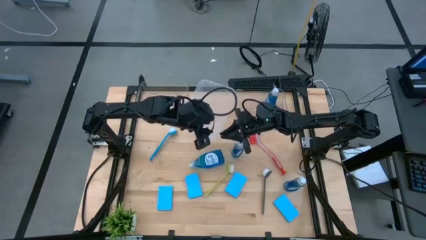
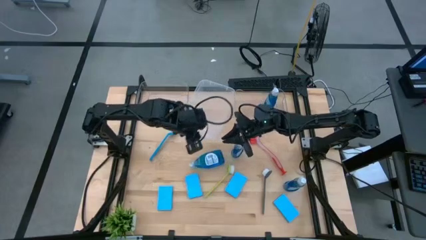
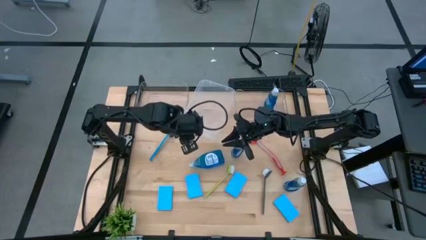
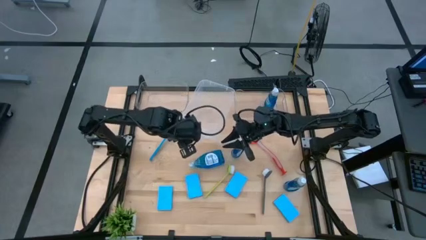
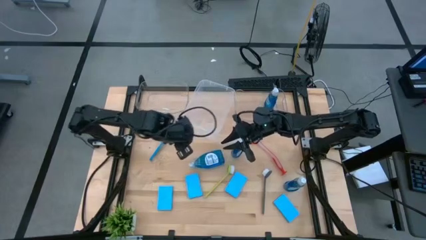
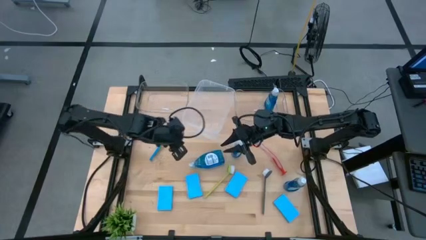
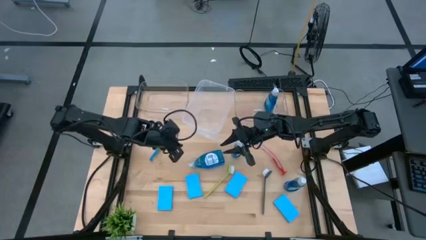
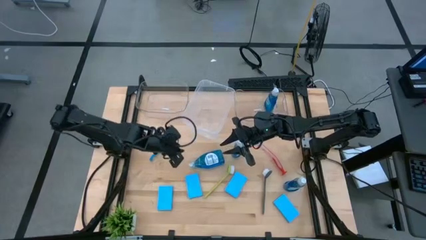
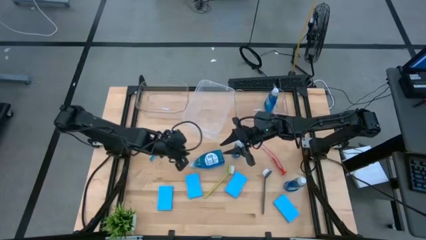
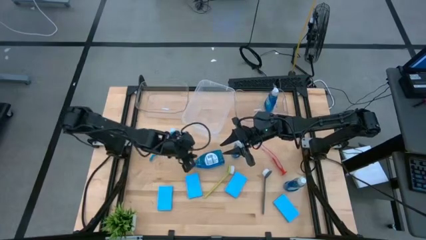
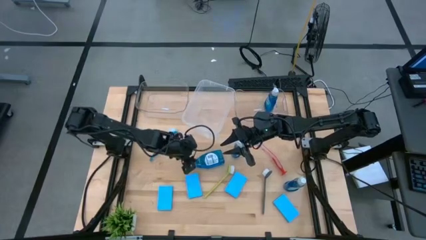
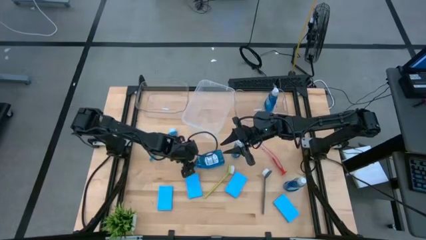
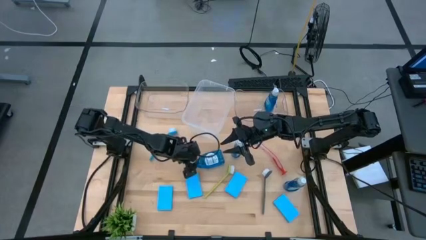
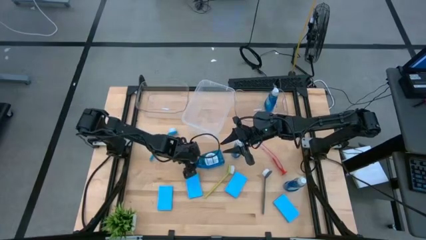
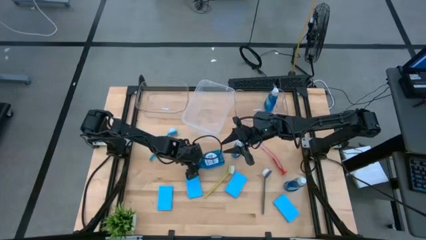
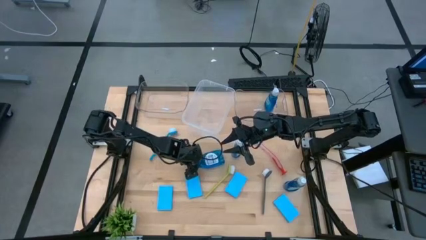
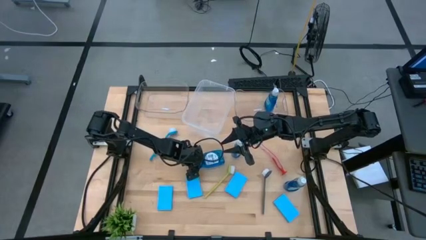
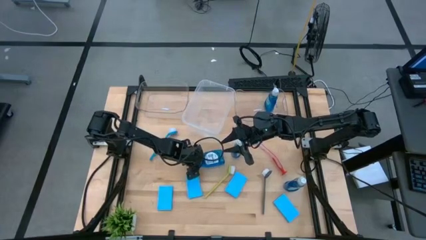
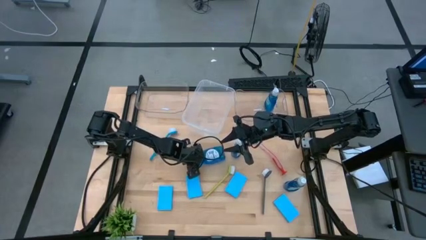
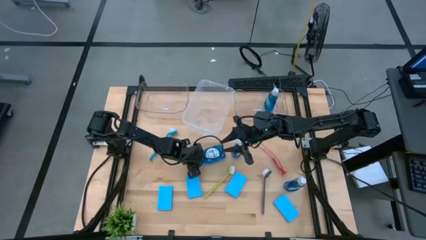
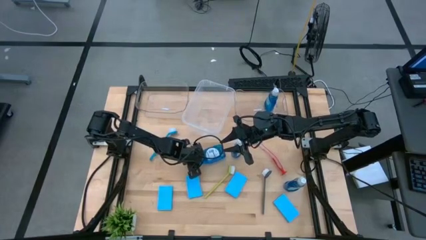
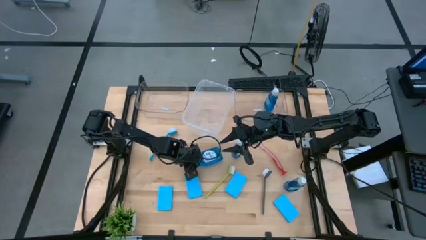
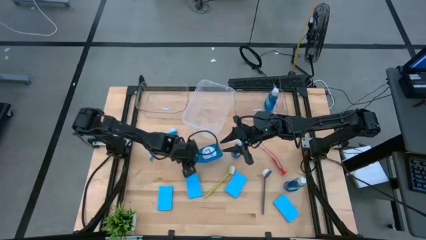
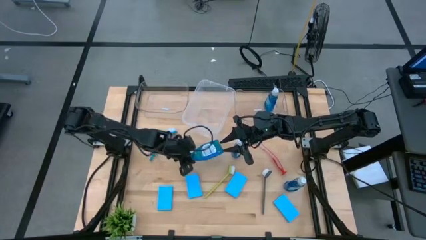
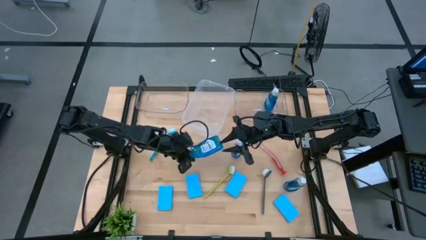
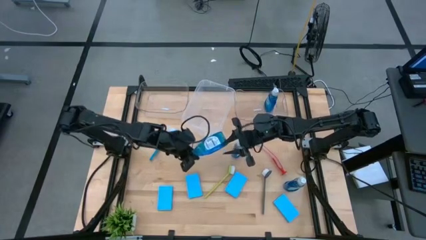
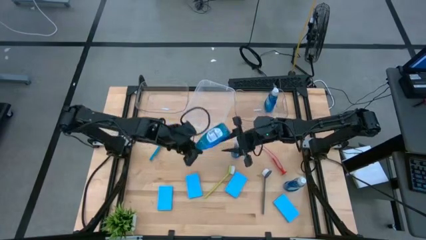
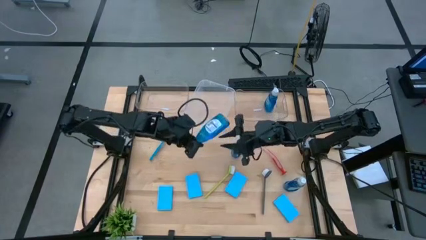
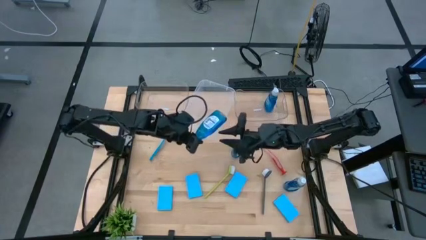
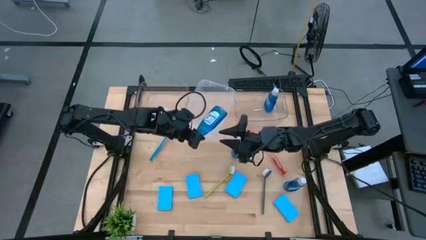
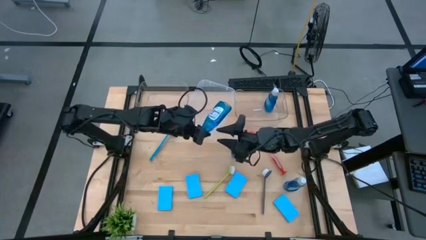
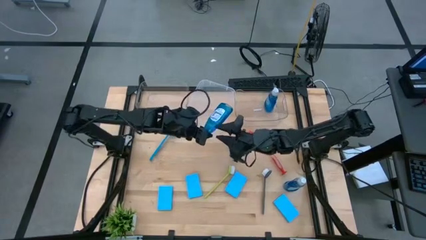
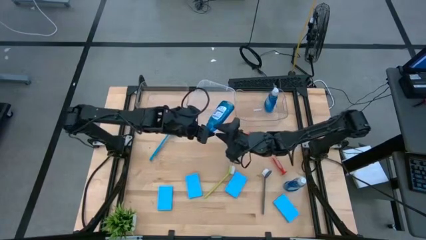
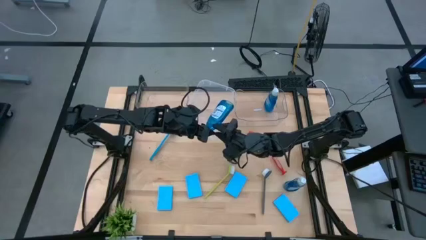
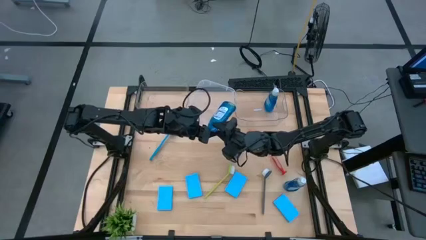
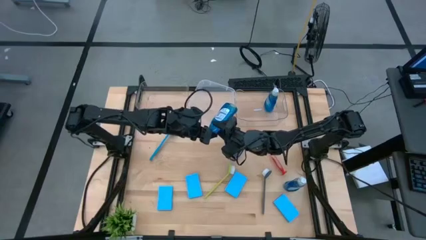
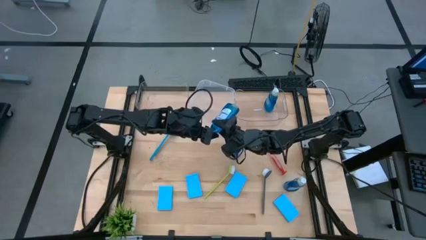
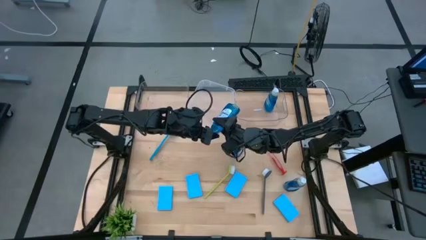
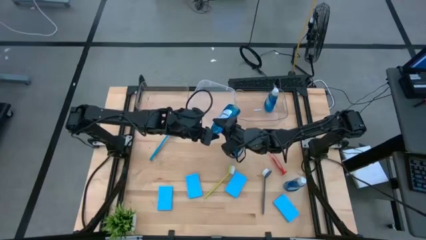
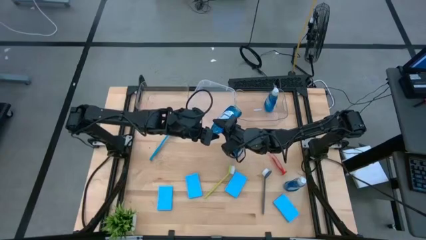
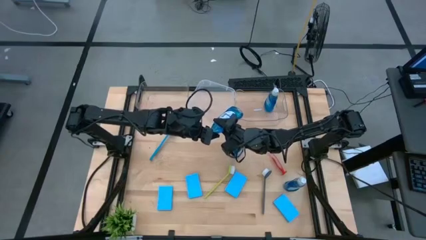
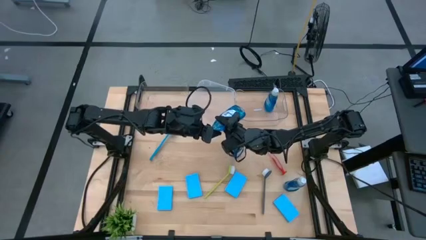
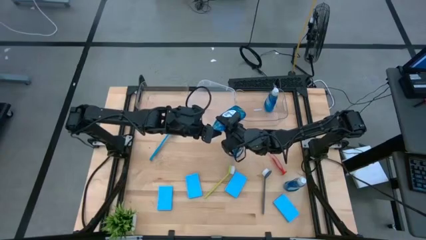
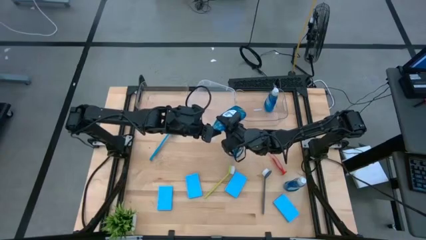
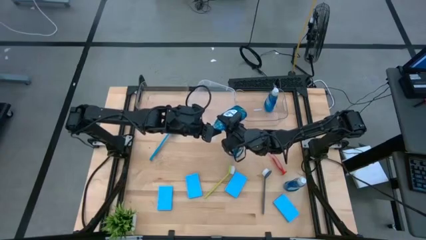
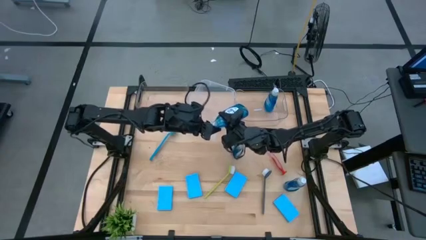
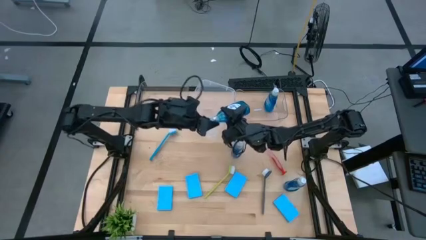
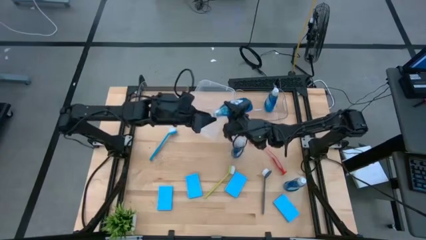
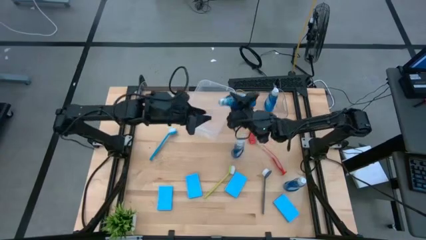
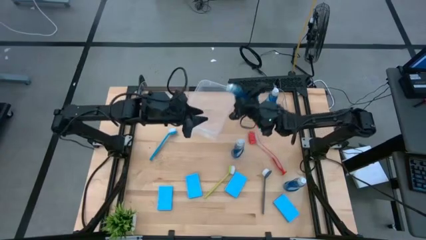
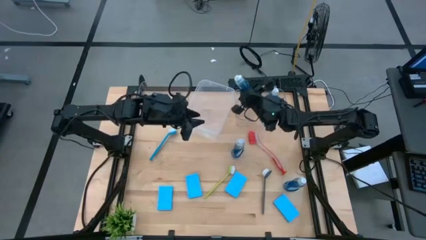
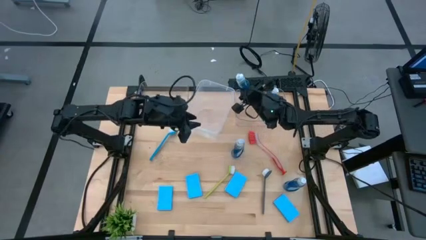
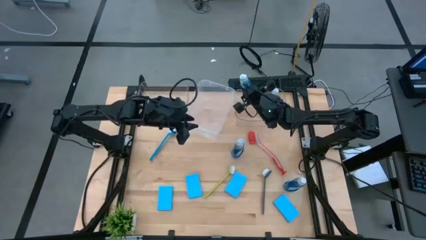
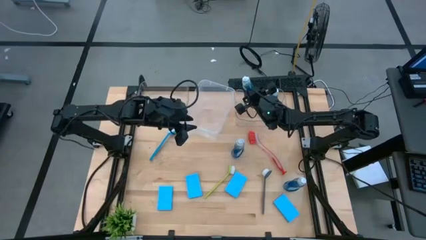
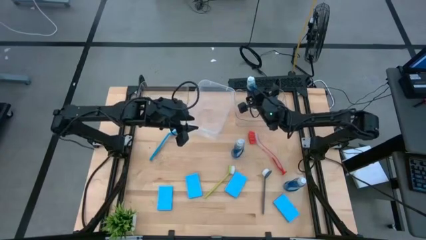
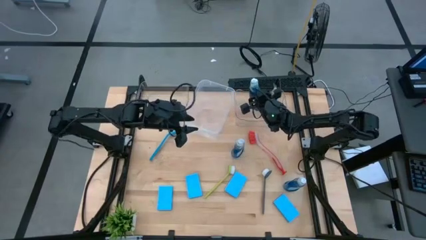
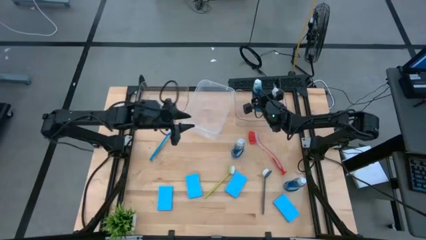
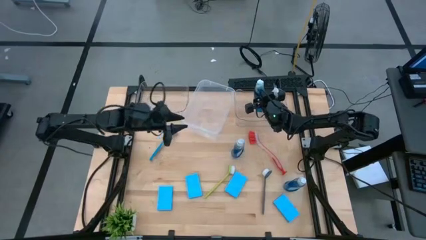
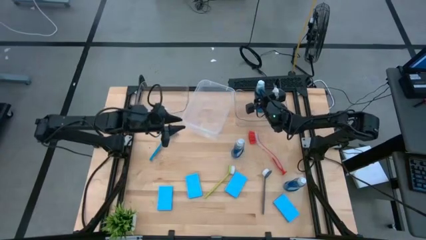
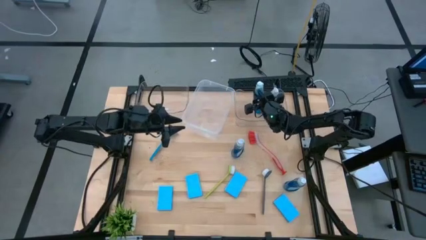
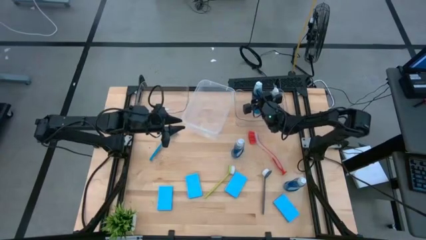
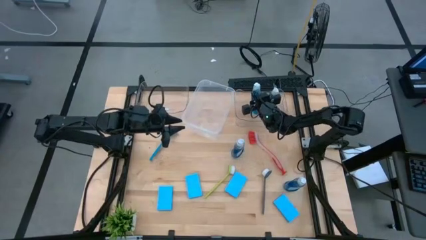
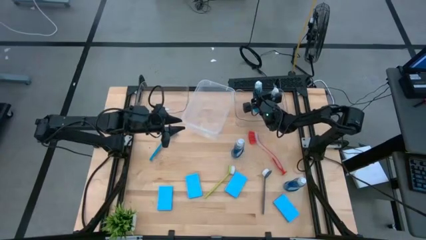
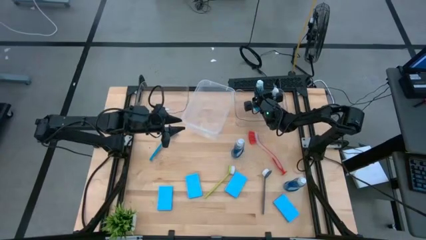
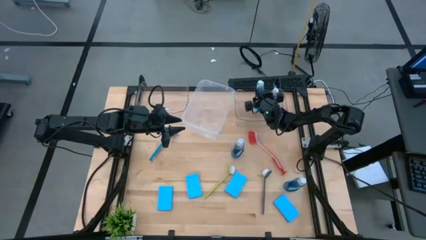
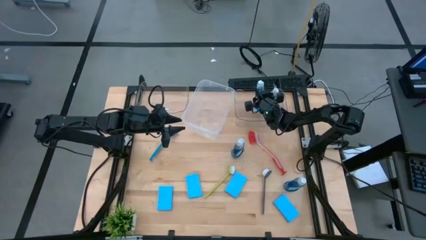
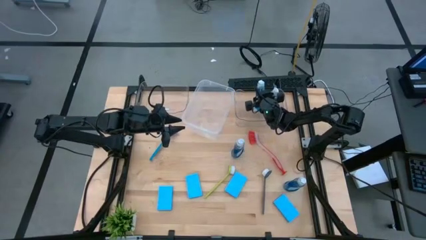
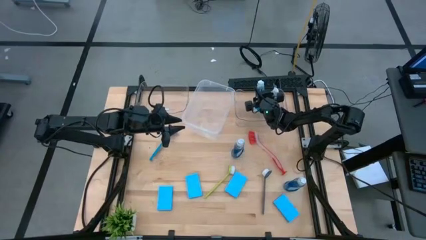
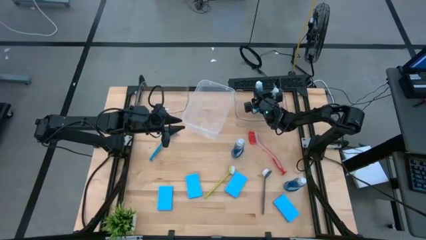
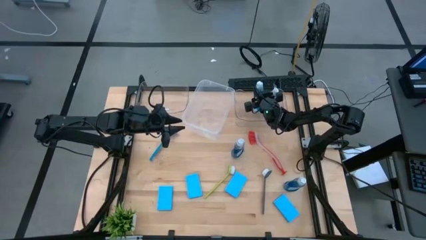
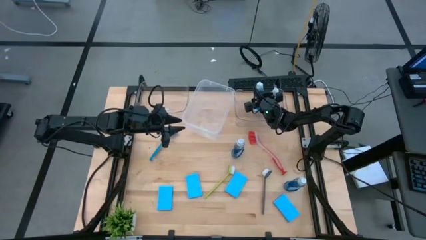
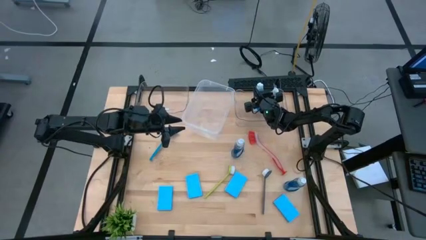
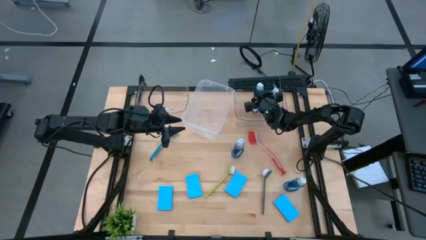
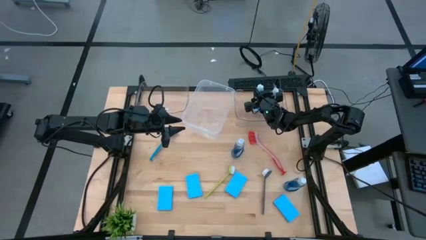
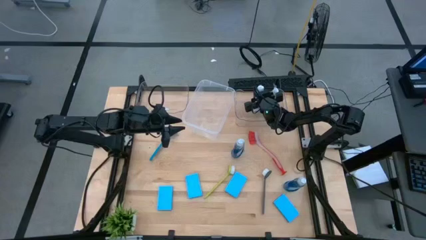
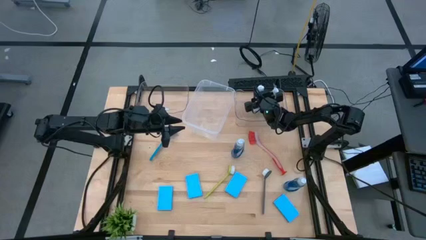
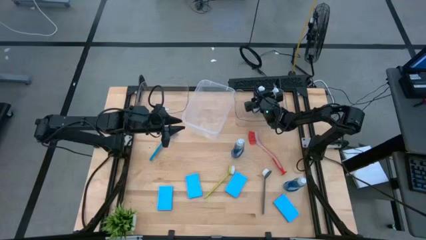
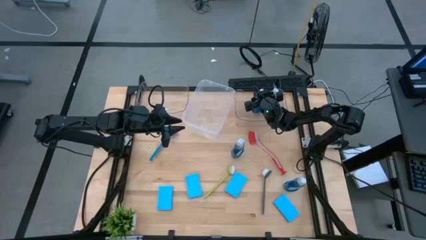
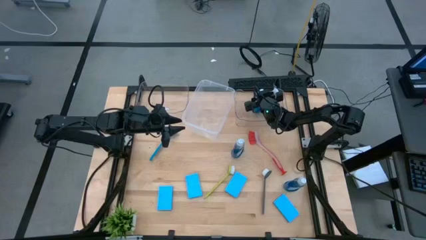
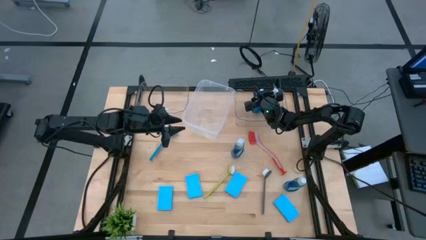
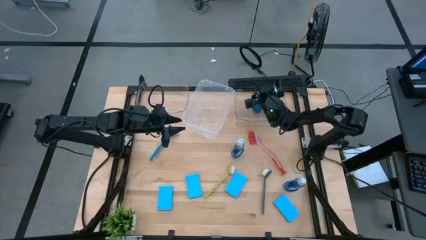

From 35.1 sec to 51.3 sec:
Task: Pick & Place Kitchen Sink Supplies
Put the blue soap dispenser into the right transparent bin
